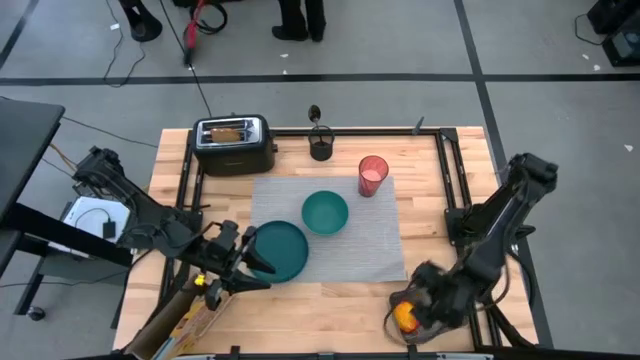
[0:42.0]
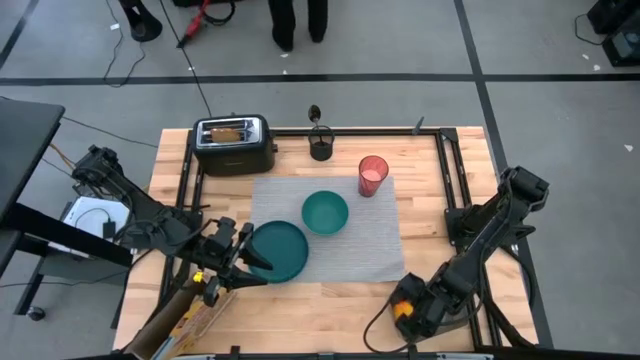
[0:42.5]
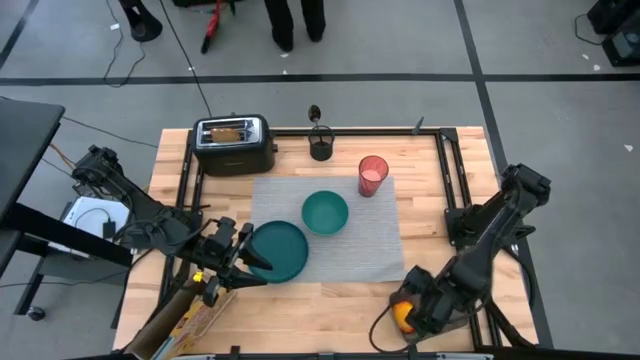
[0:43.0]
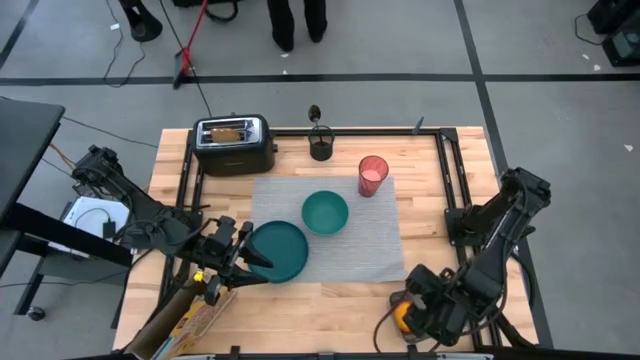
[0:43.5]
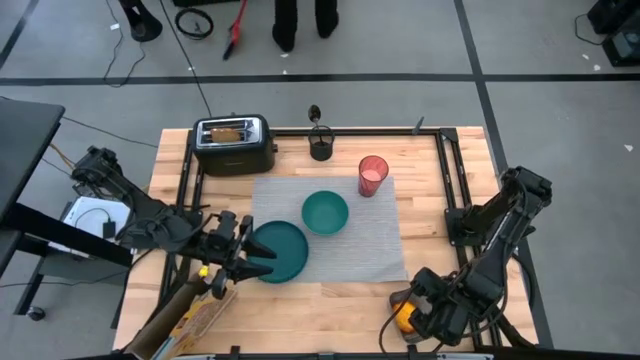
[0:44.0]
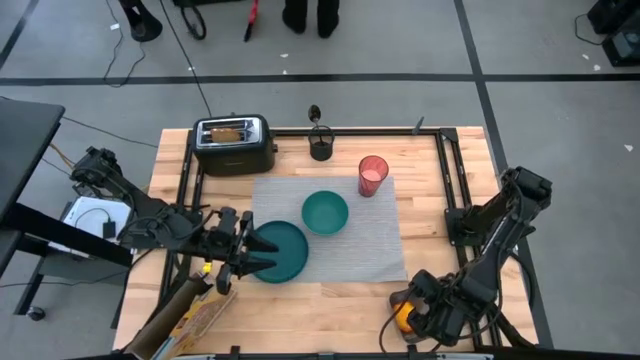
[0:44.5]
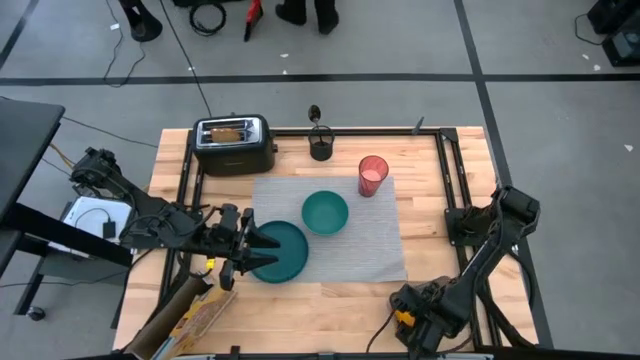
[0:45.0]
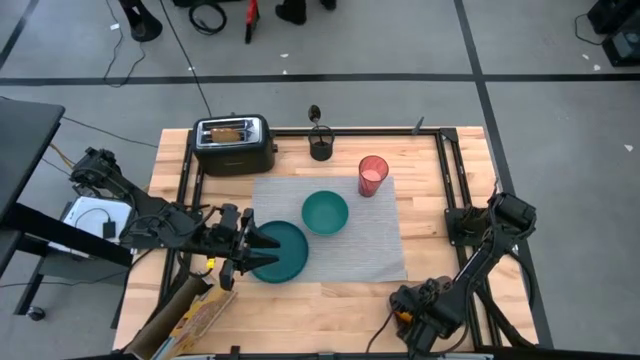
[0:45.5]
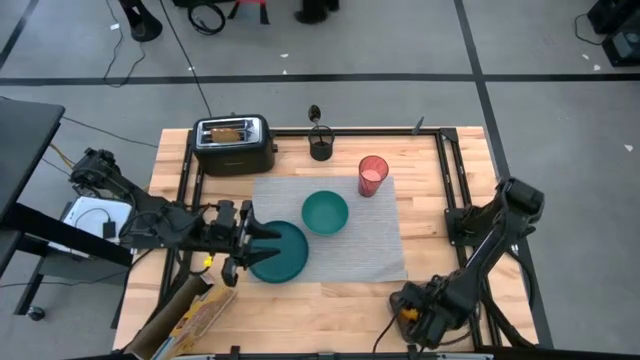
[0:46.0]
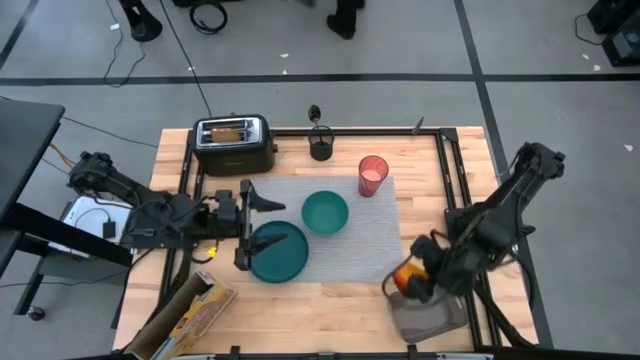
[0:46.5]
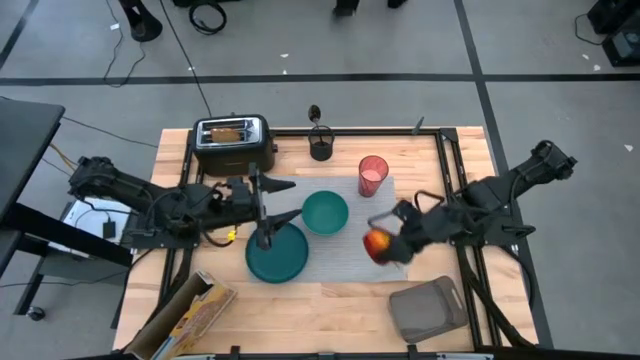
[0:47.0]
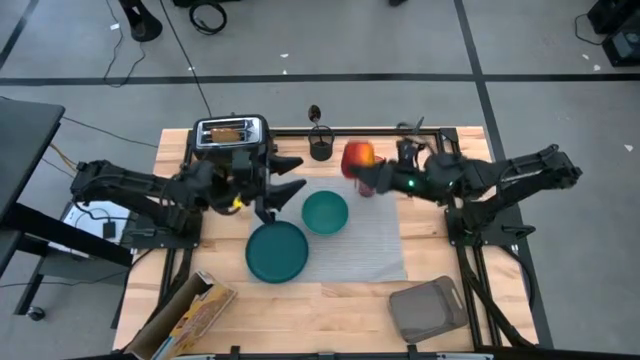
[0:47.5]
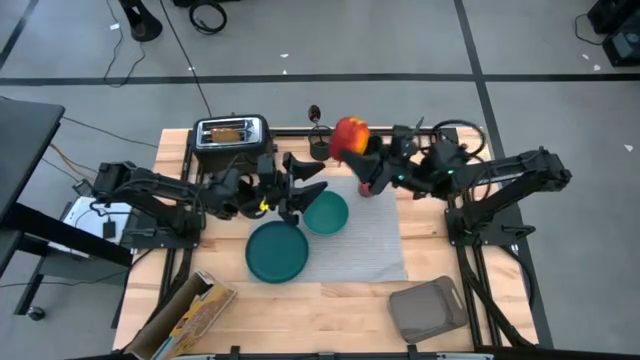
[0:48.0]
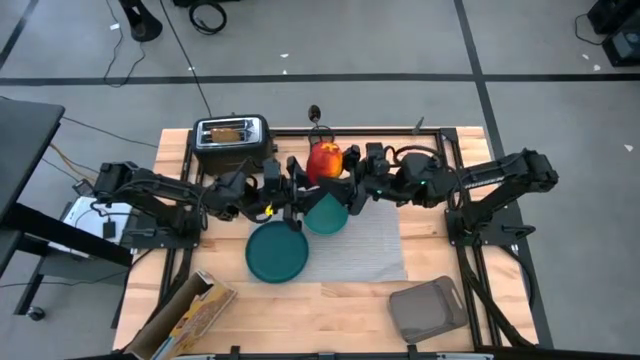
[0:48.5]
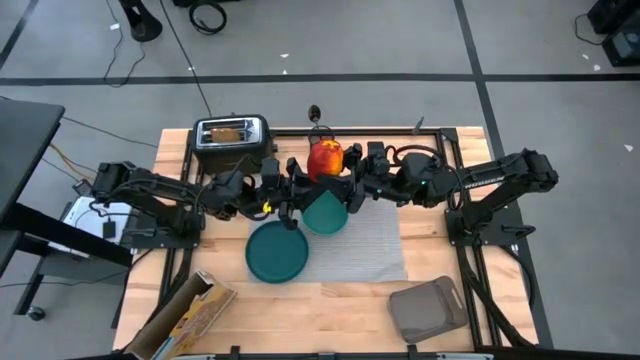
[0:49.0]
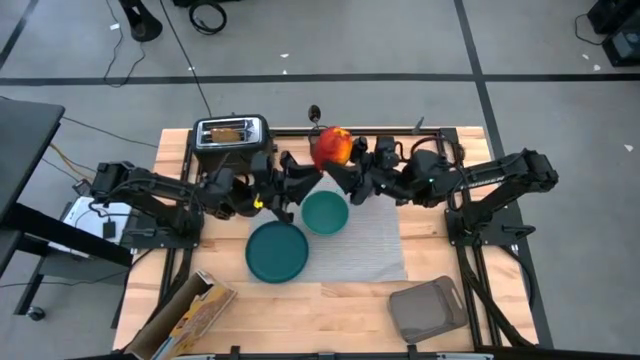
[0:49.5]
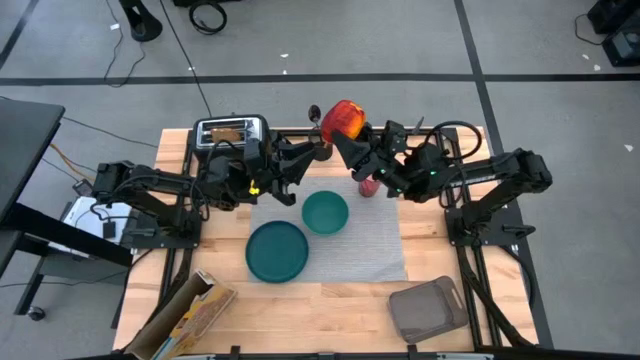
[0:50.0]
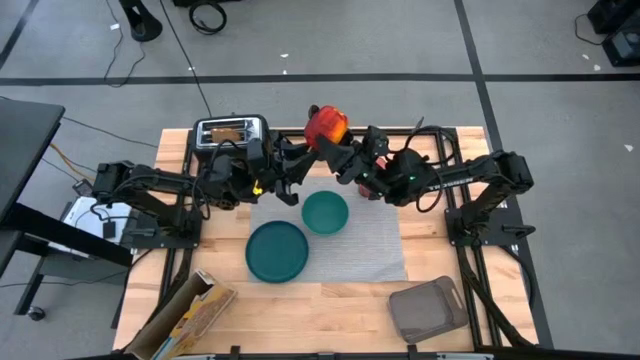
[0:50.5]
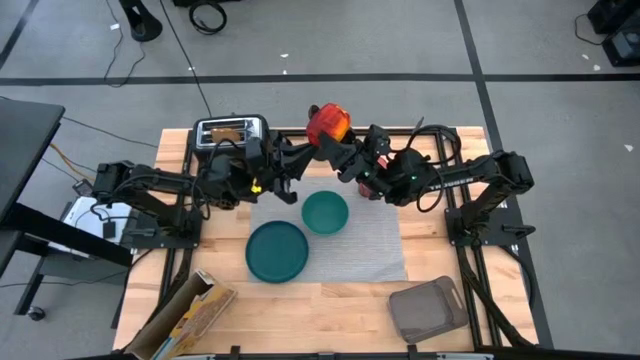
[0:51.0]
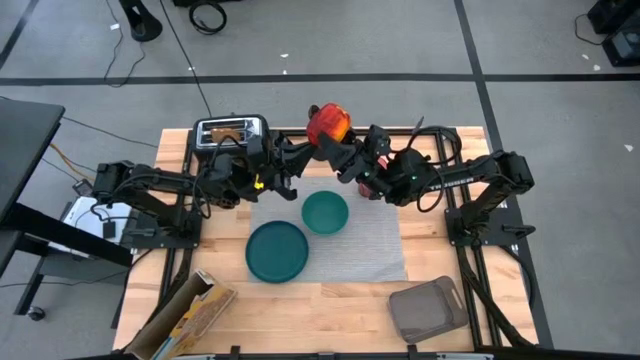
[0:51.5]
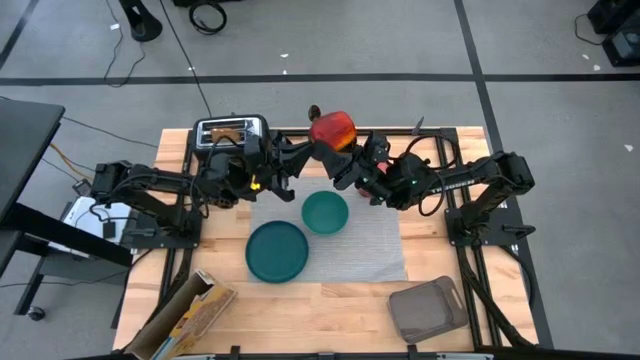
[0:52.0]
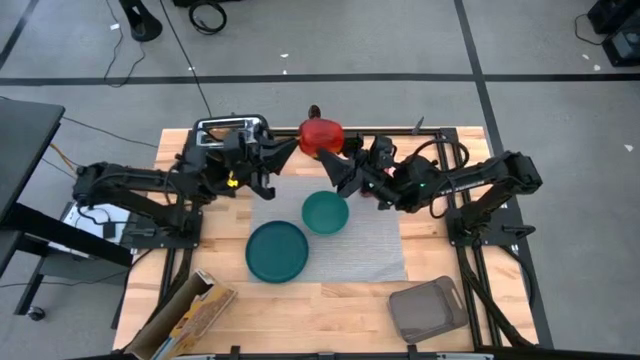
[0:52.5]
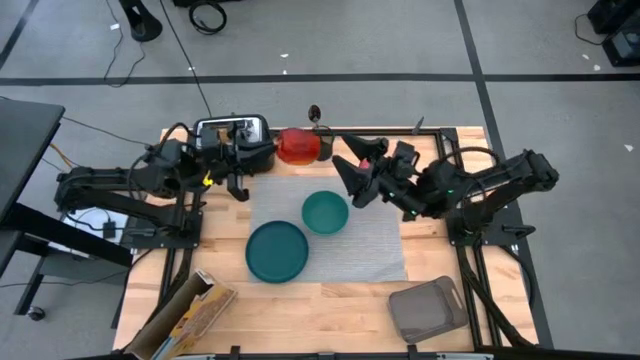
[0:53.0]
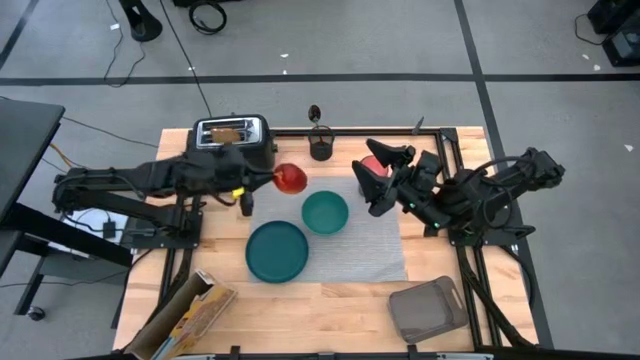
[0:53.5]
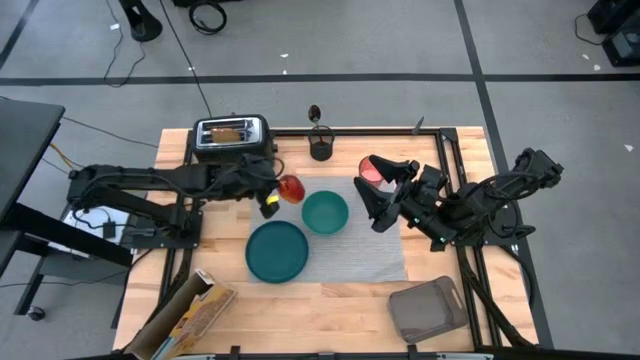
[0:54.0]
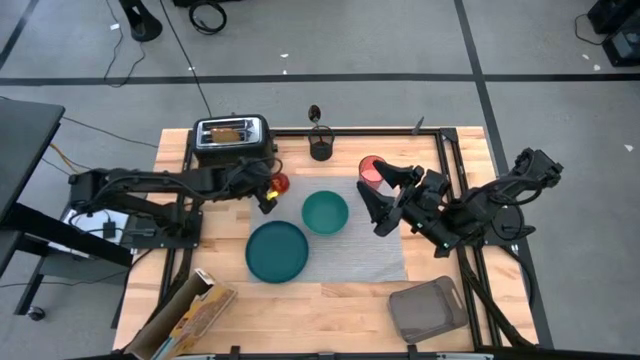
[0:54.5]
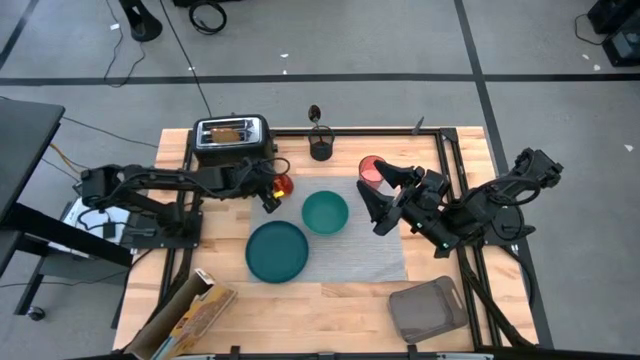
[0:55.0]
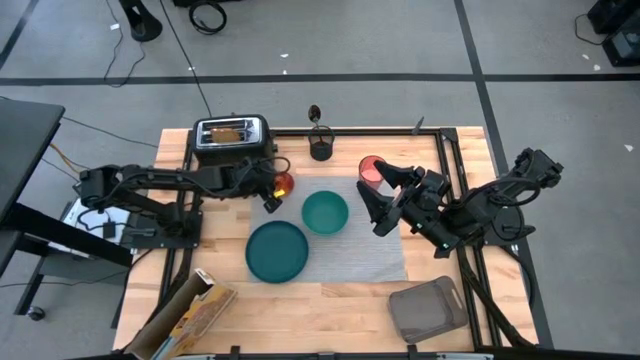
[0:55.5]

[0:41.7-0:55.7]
Task: Arrange a breakfast setting
Put the red and yellow apple on the gray tablemat to the top left of the green bowl

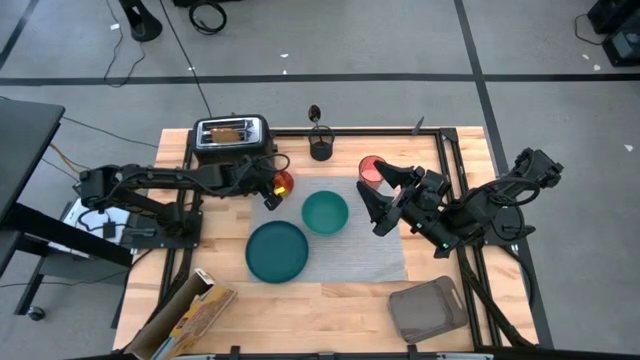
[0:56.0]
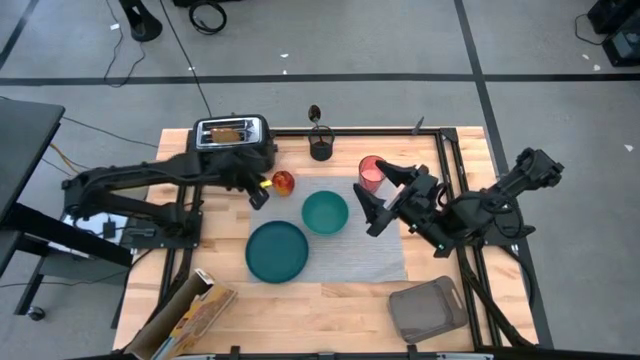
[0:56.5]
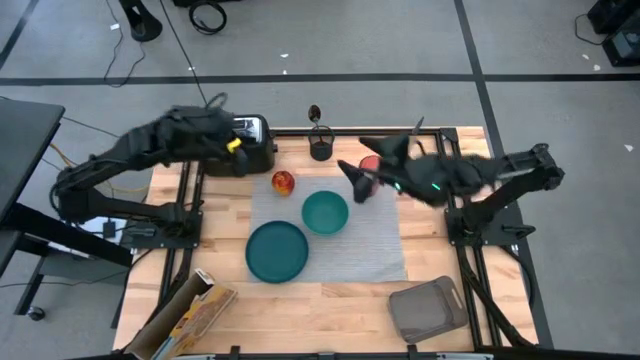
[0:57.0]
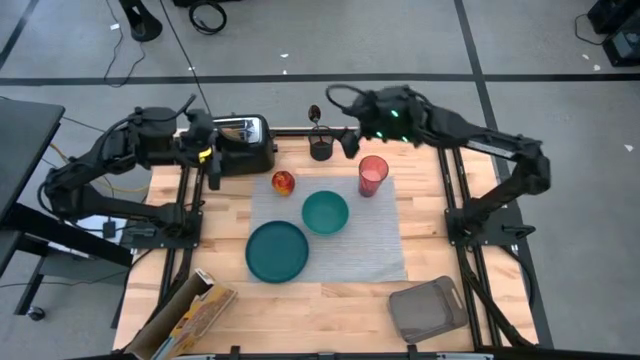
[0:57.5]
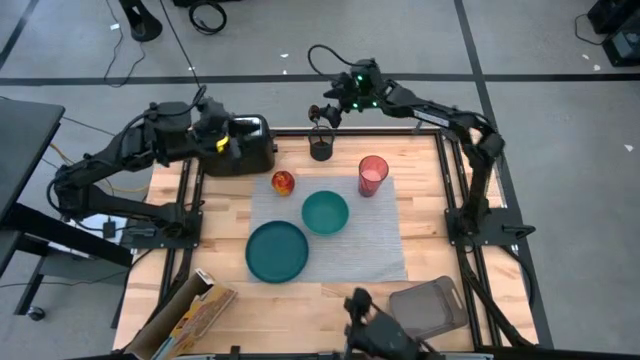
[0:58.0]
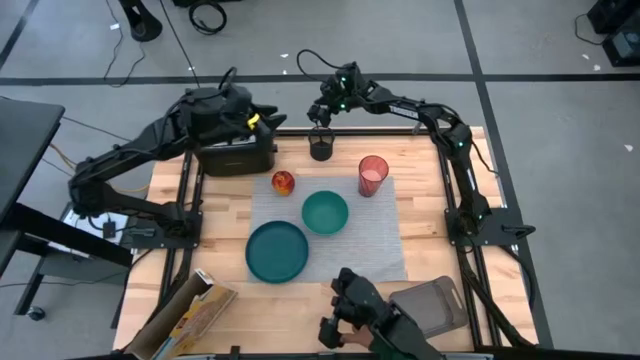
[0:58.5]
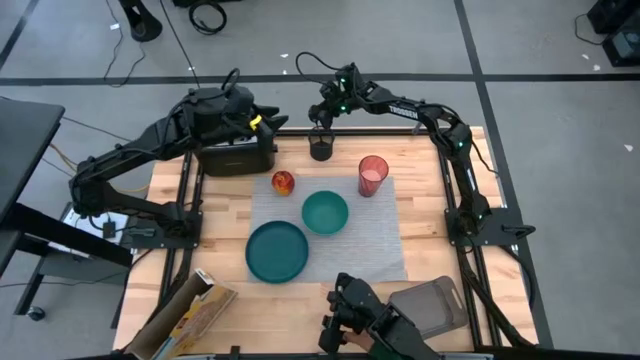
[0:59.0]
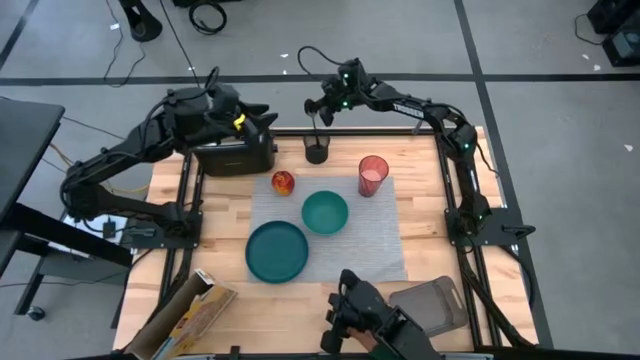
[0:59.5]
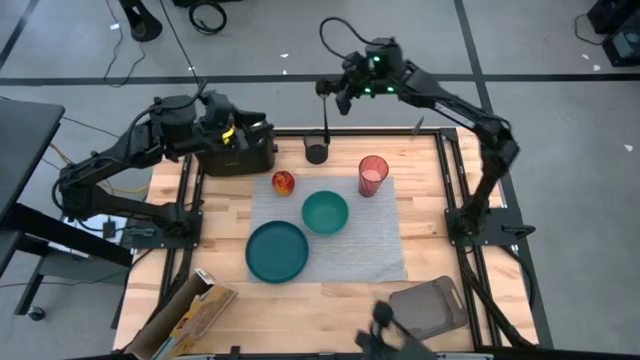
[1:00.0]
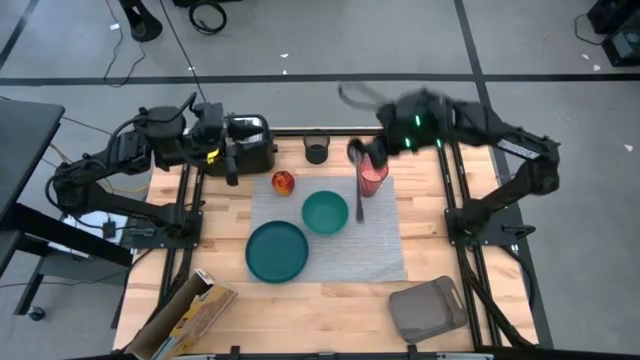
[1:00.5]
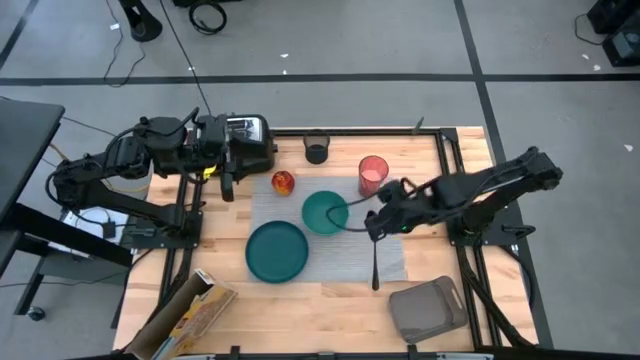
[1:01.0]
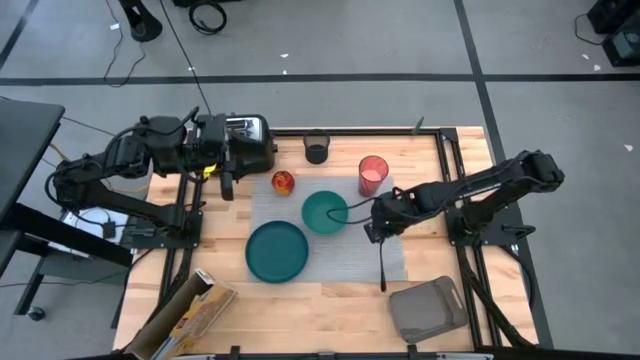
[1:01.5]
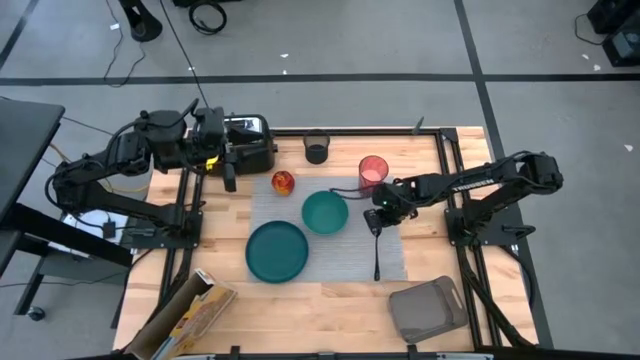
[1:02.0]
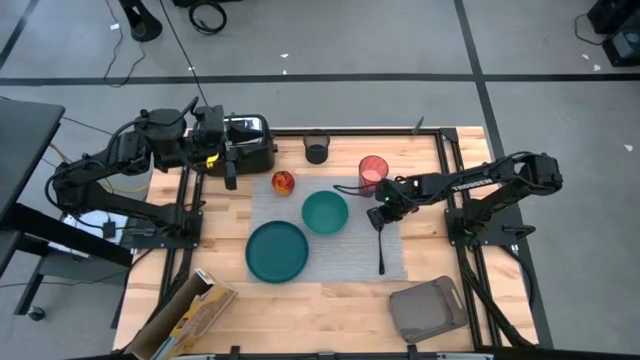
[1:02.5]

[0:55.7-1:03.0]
Put the black spoon on the gray tablemat to the right of the green bowl
